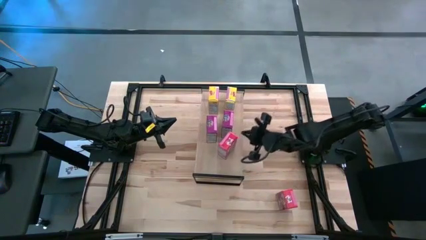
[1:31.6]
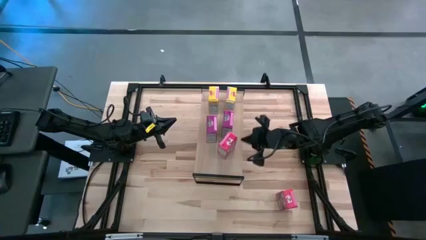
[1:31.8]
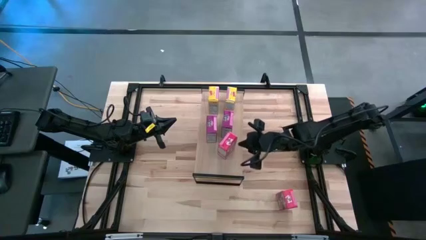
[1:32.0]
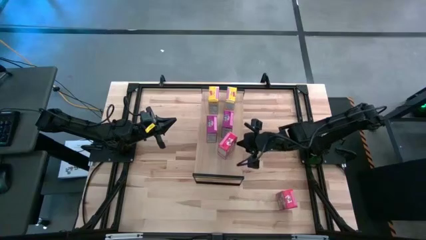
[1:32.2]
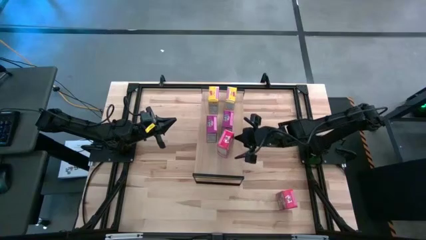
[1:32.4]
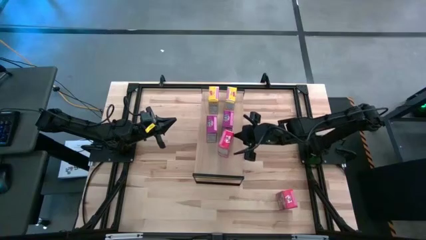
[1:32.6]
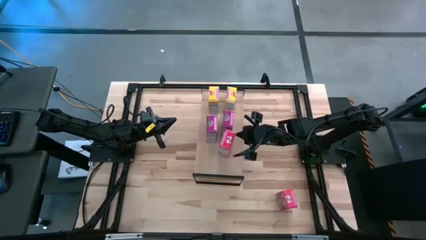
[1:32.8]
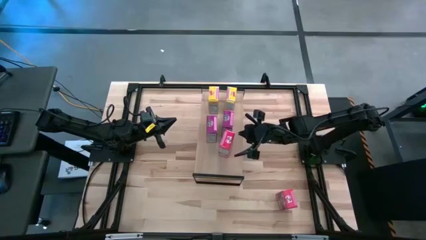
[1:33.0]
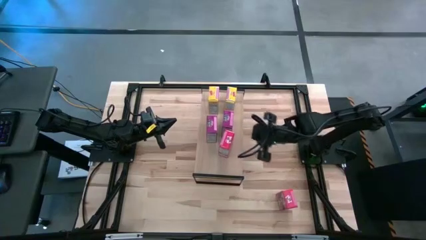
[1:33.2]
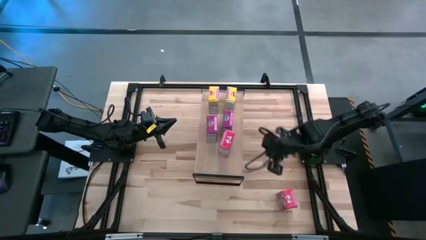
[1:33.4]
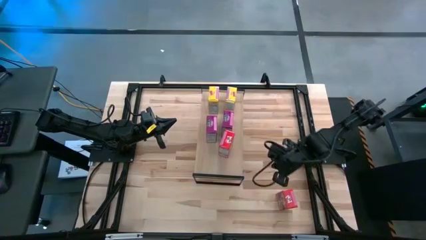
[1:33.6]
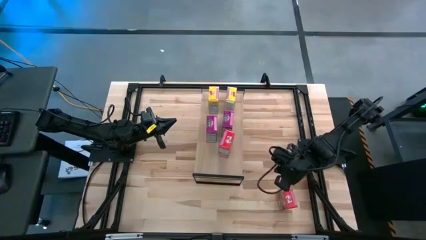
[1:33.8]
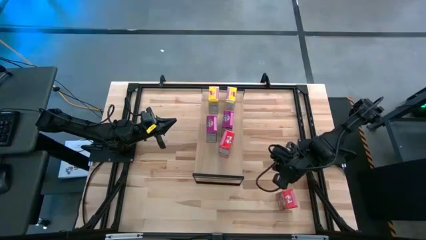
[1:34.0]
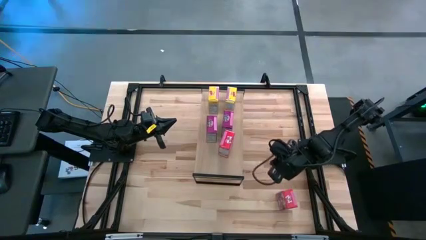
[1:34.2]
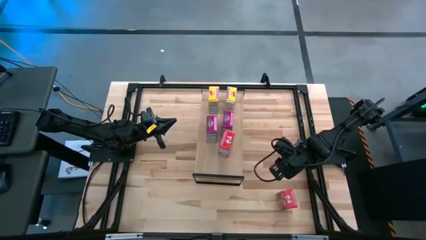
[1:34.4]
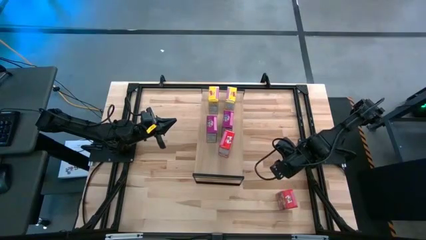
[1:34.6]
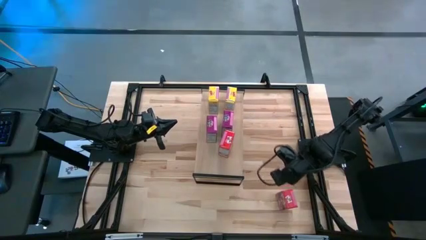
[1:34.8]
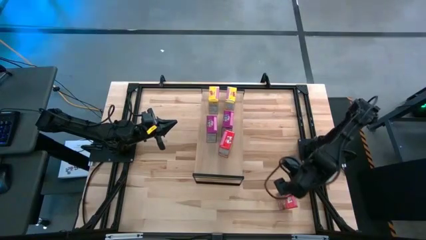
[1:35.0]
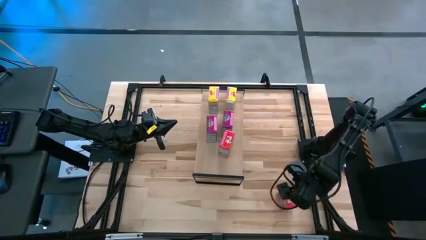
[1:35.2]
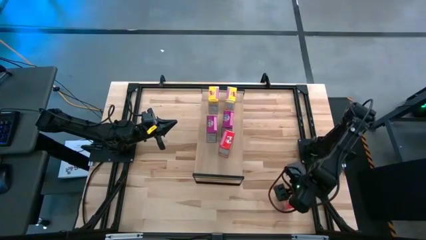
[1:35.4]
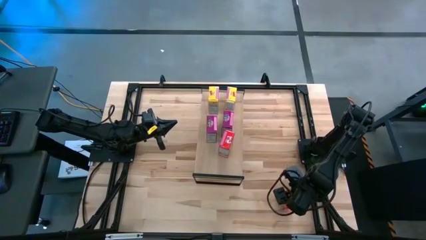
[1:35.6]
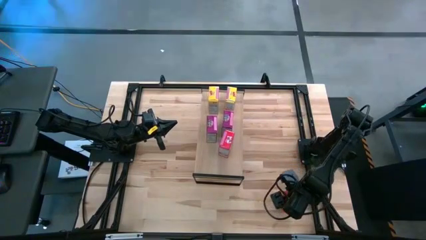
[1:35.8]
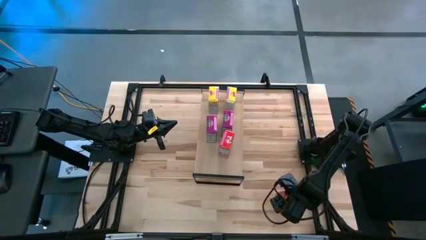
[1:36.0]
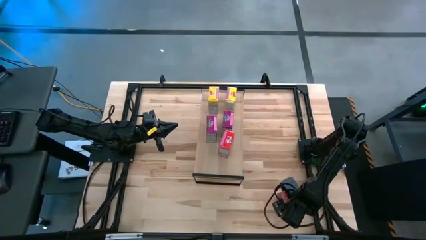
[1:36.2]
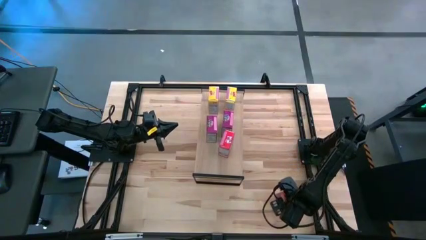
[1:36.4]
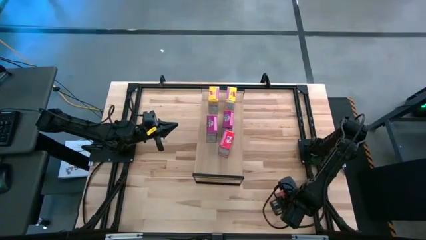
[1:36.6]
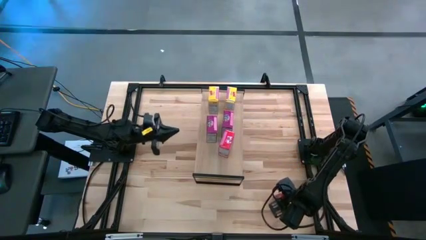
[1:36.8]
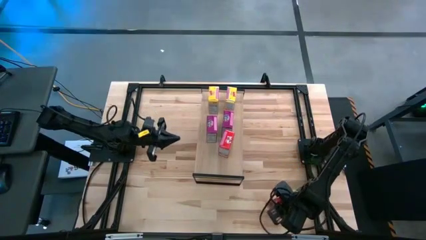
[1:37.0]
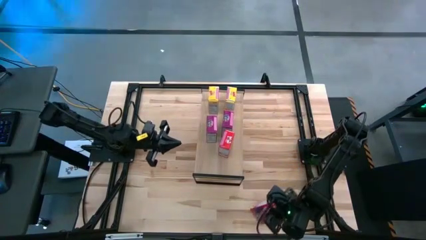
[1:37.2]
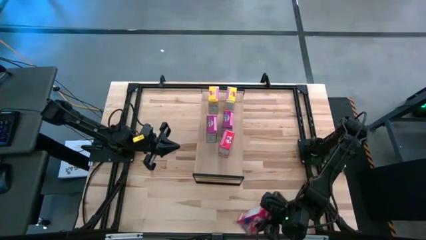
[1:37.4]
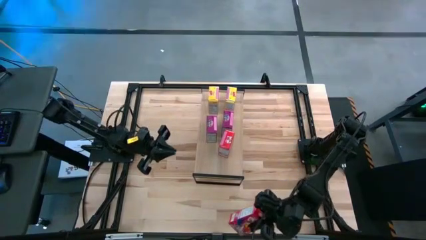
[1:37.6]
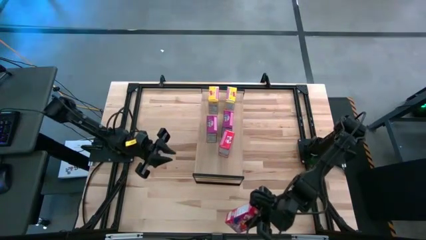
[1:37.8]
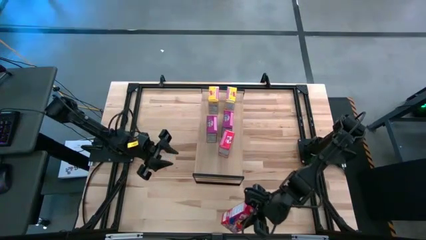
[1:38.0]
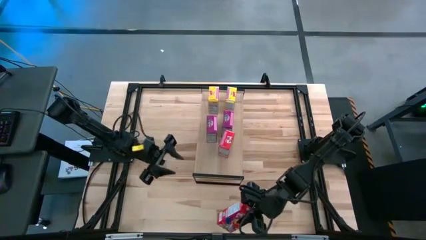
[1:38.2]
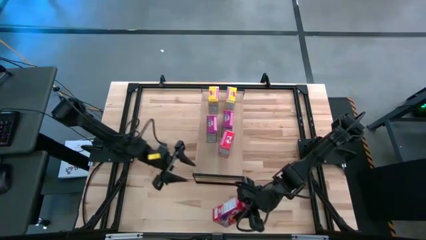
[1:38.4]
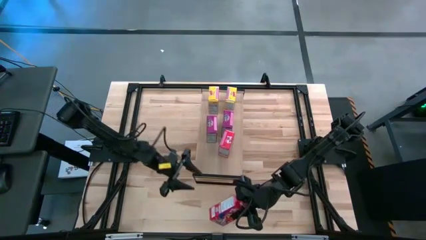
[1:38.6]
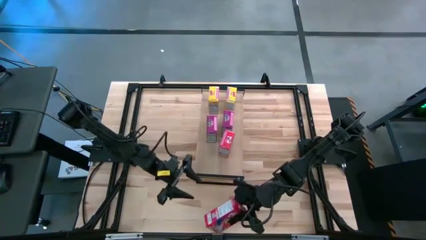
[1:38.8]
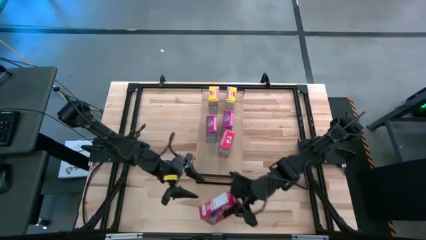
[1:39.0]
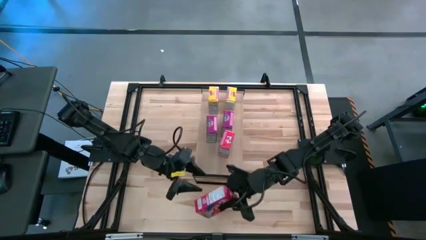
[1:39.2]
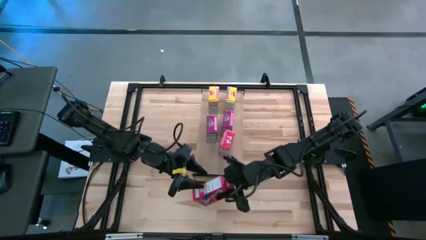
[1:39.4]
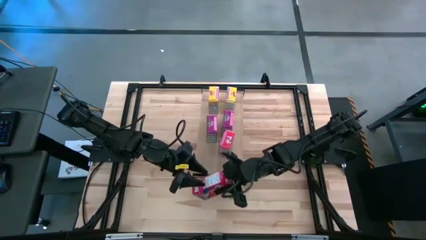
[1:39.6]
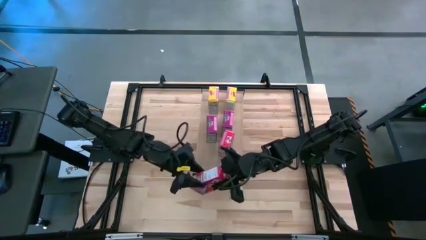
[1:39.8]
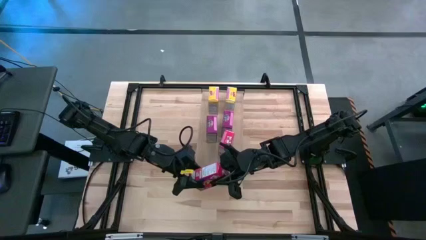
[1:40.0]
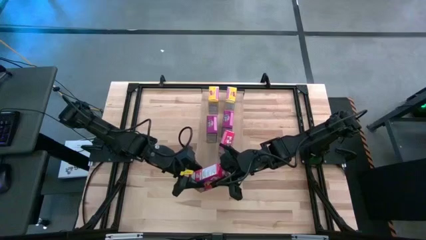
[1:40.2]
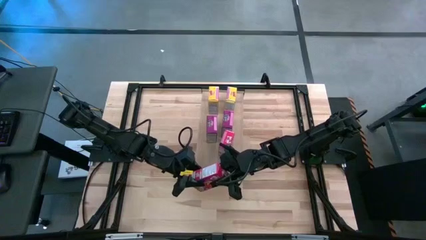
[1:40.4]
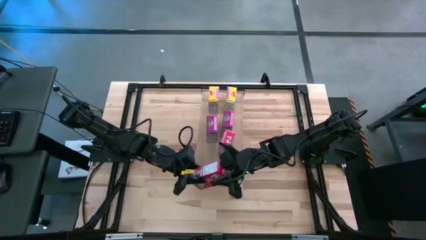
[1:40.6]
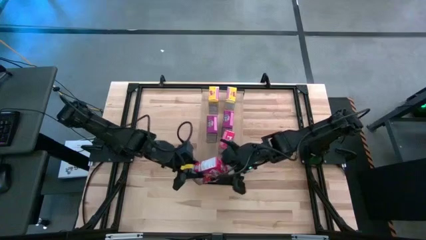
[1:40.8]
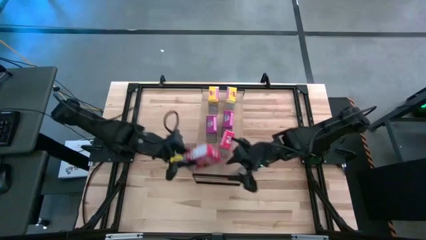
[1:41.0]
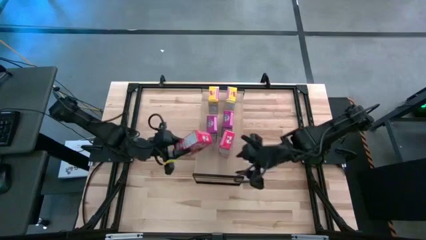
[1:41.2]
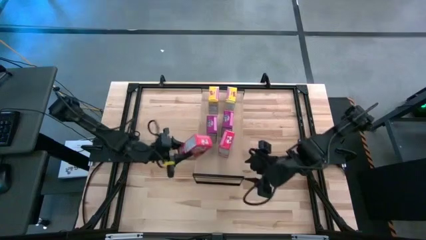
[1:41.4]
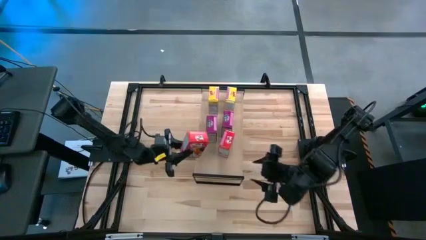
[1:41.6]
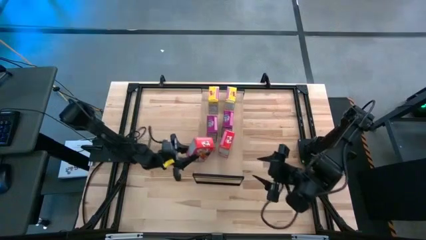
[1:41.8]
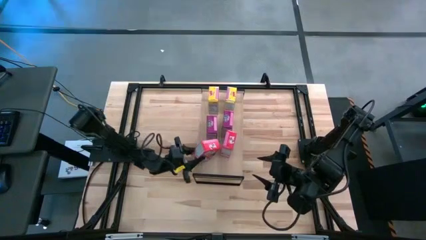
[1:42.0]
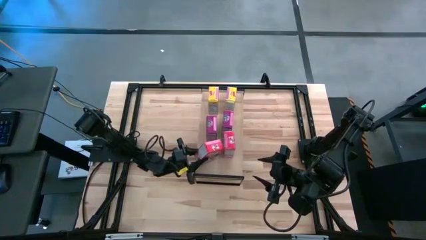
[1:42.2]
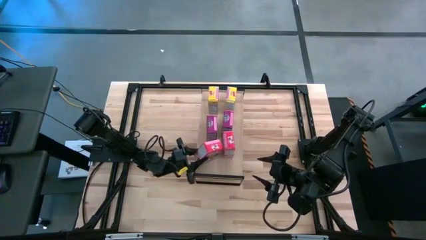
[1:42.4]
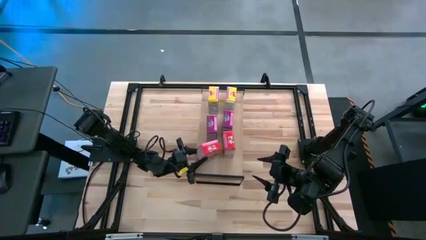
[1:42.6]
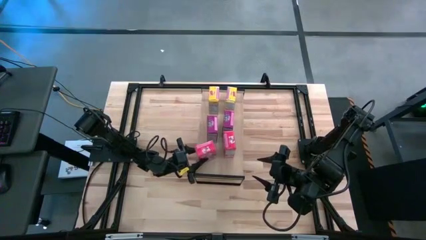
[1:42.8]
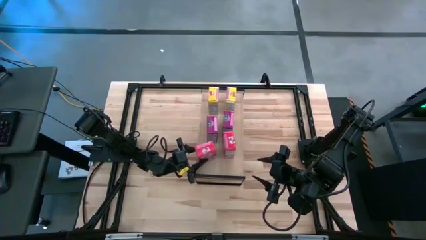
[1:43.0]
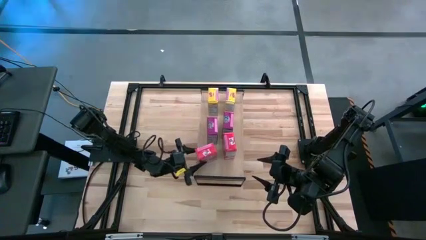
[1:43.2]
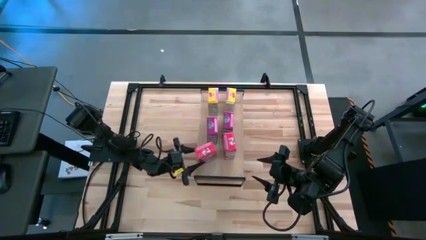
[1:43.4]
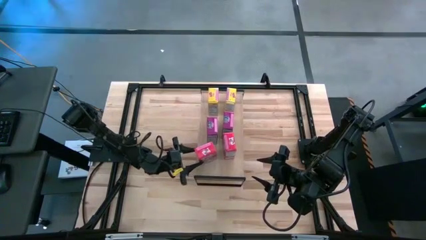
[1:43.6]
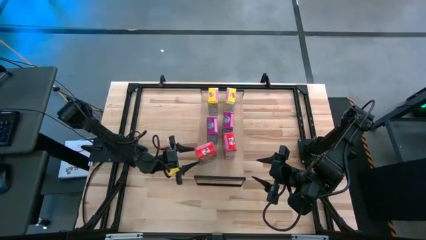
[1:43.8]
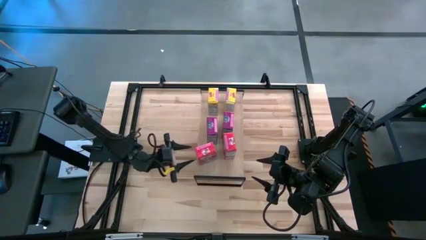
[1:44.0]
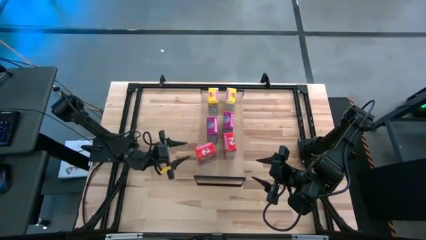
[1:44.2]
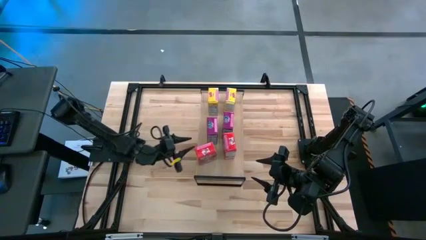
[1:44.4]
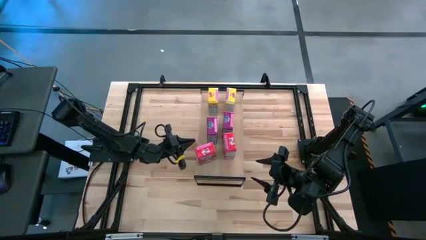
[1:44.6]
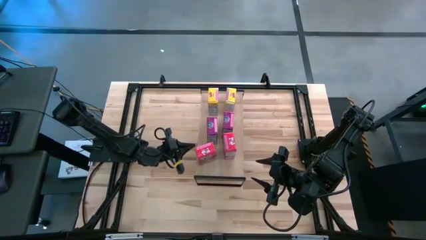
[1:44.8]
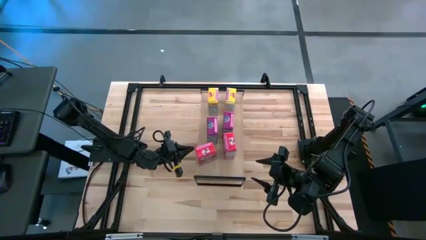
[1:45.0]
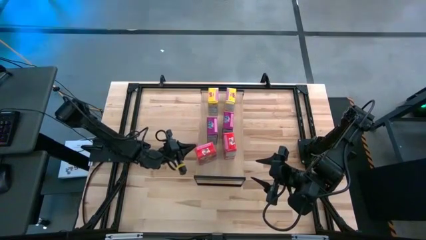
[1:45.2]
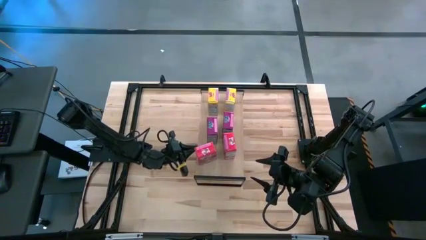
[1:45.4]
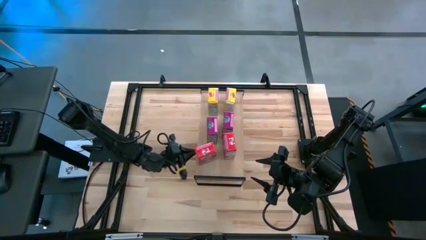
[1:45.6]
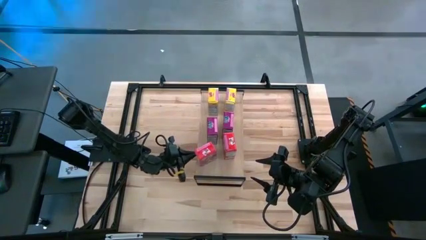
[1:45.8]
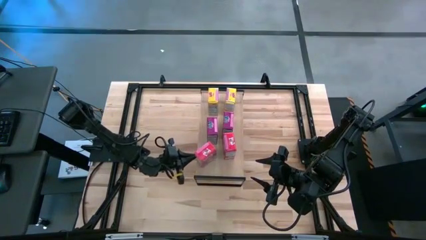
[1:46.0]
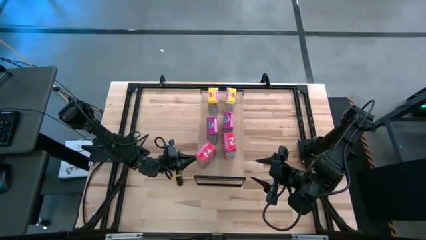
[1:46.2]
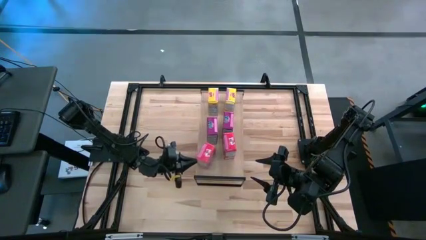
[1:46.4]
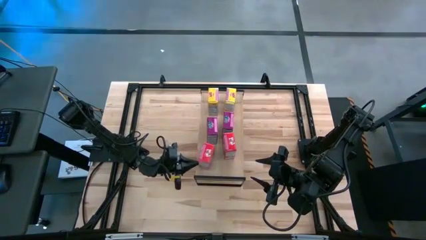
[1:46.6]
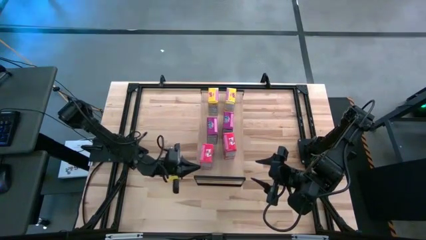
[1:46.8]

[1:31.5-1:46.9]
Task: Stack cereal on shelf
Put the red cereal box on the shelf

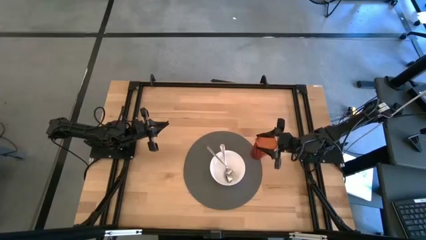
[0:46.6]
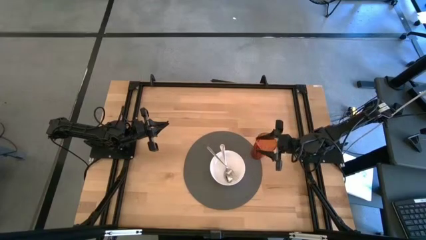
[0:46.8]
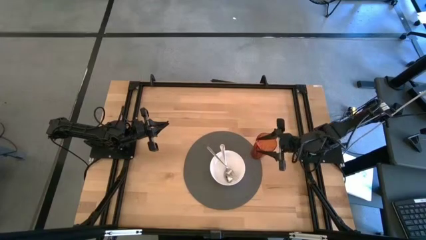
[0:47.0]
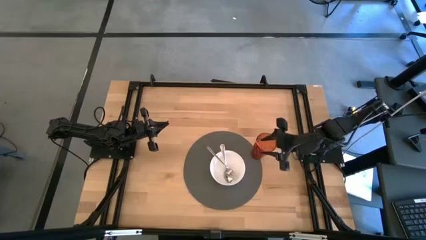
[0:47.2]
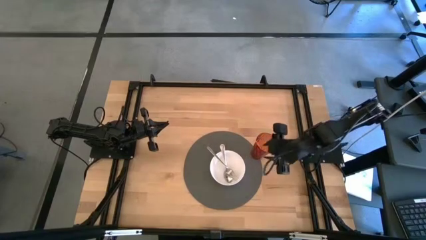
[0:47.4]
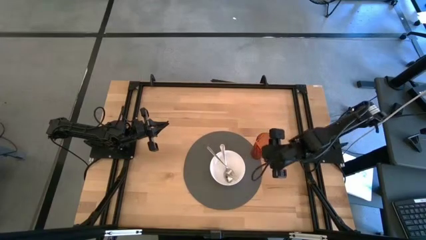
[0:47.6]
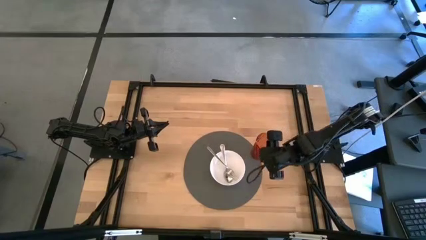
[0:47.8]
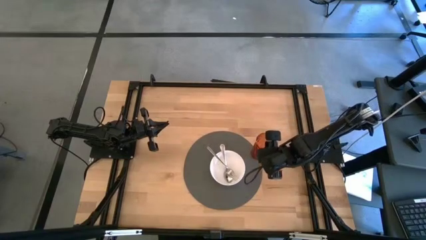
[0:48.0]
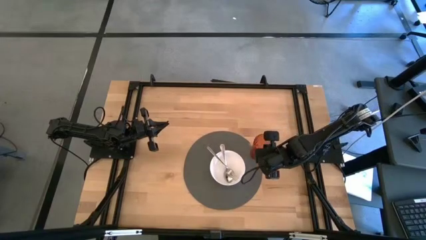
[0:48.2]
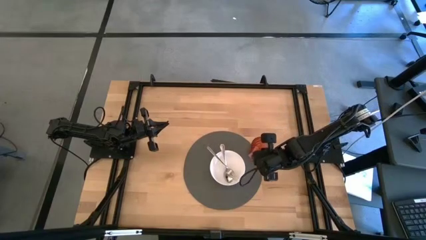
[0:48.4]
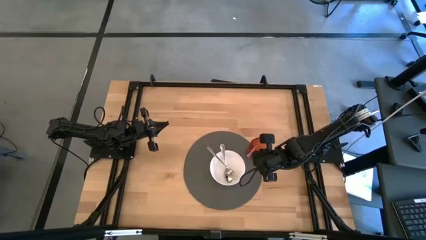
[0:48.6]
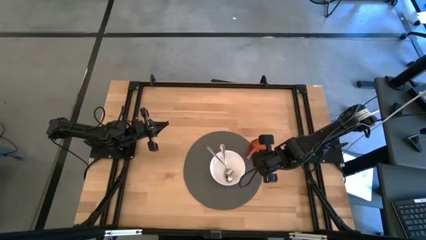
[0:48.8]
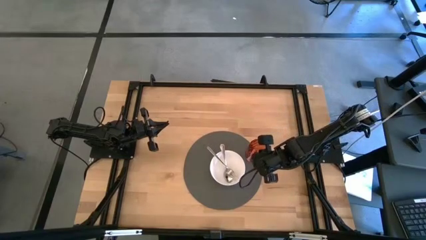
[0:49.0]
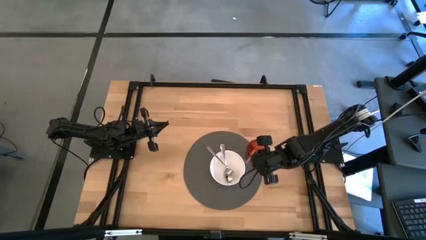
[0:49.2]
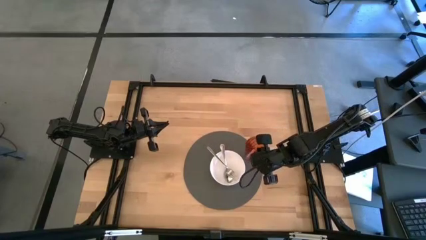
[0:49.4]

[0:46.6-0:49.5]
Task: Pick & Place Utensil
Adjust the orange cup on the gray mat
